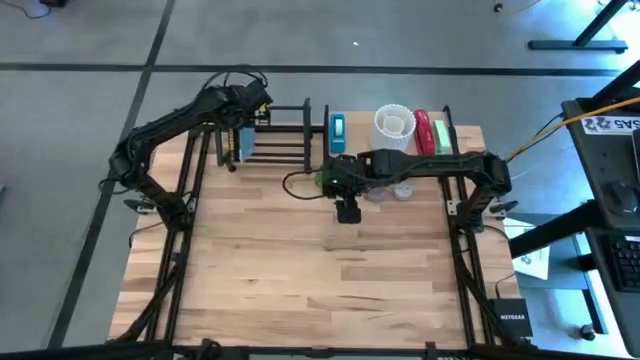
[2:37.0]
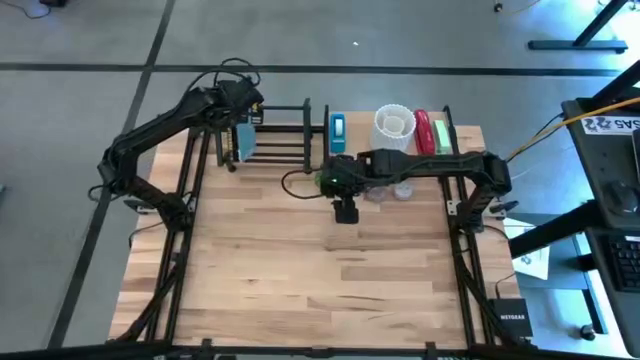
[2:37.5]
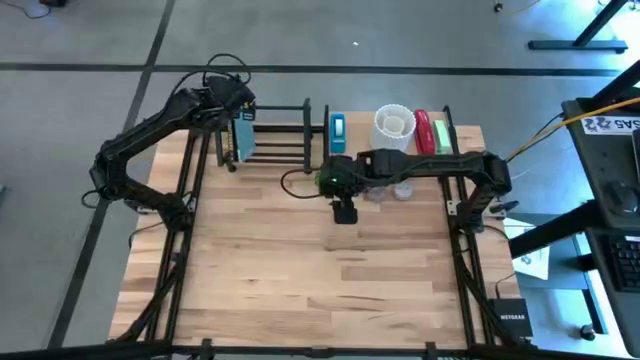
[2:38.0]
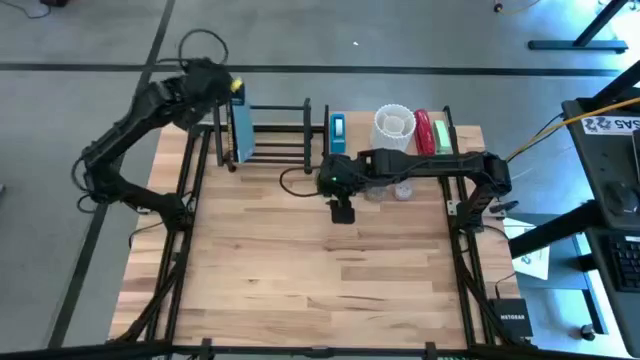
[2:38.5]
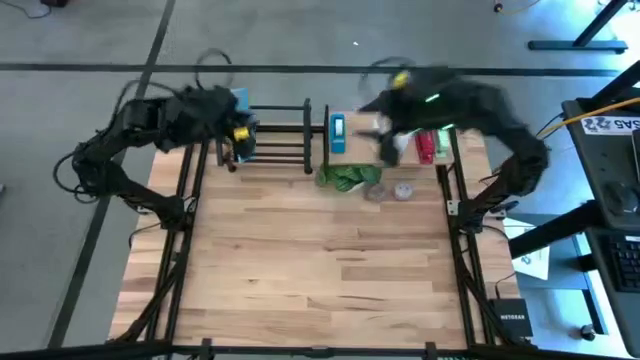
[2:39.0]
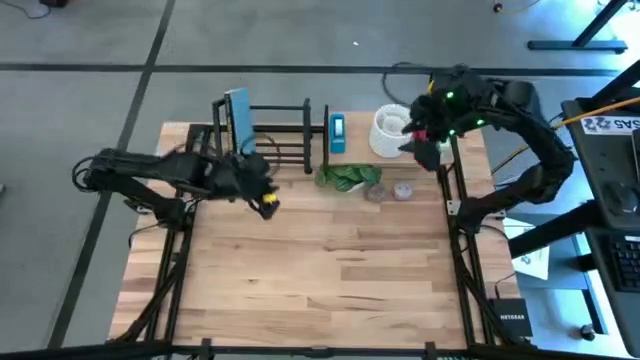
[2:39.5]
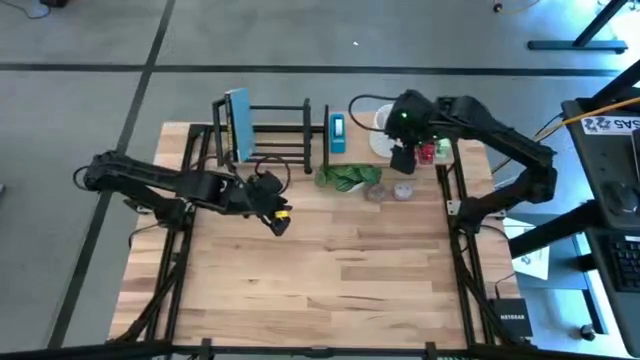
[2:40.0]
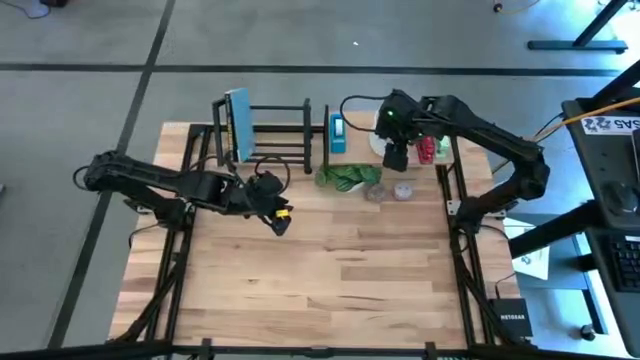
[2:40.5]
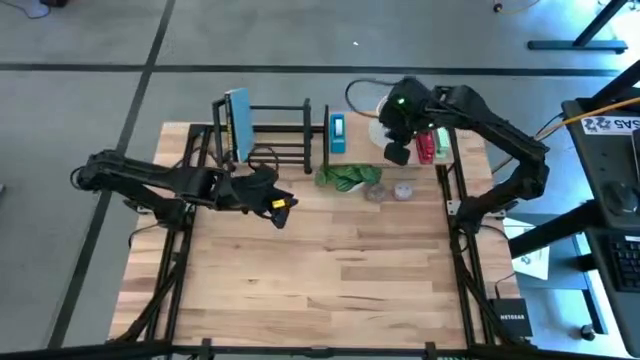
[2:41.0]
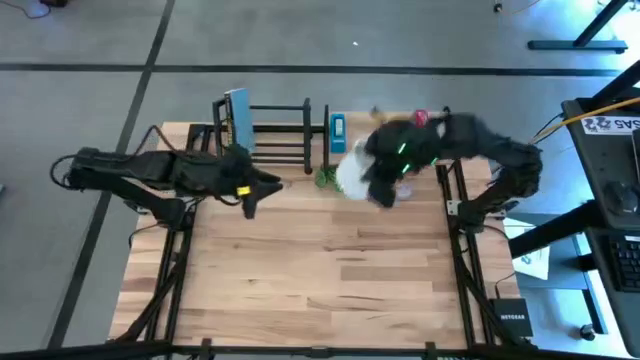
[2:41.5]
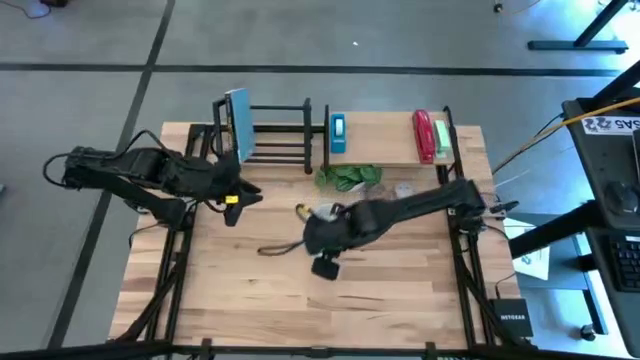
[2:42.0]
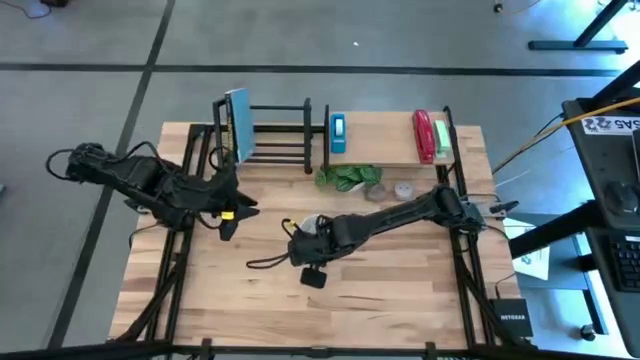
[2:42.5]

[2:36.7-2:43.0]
Task: Stock shelves
Remove the white pencil holder from the shelf

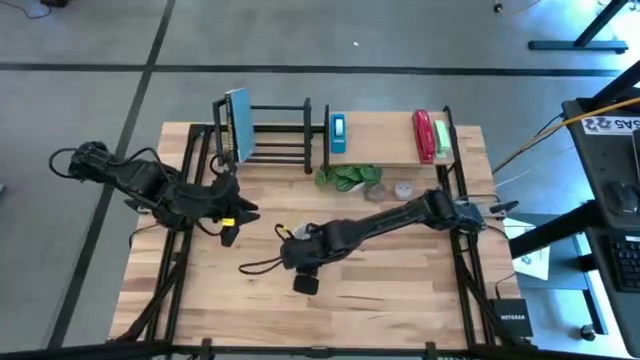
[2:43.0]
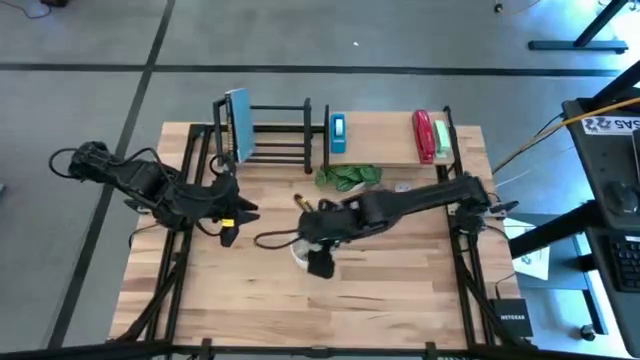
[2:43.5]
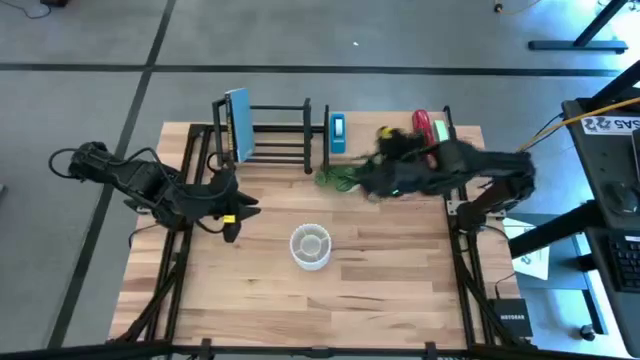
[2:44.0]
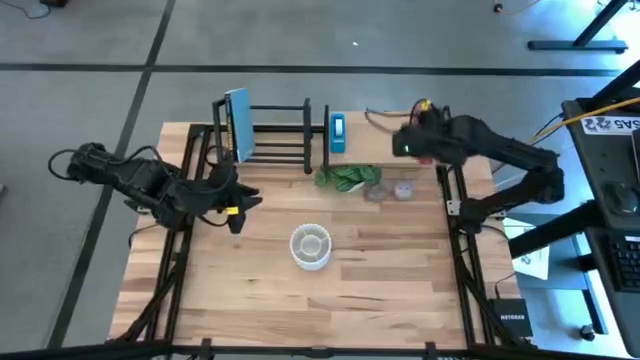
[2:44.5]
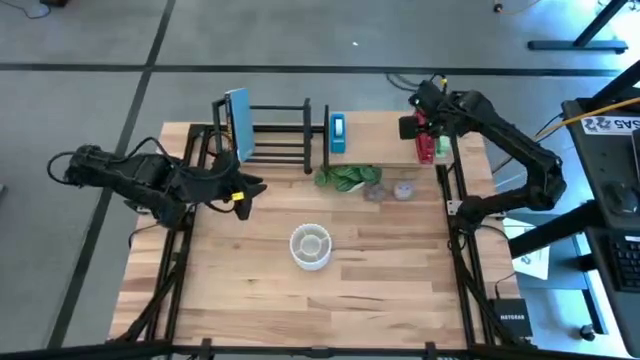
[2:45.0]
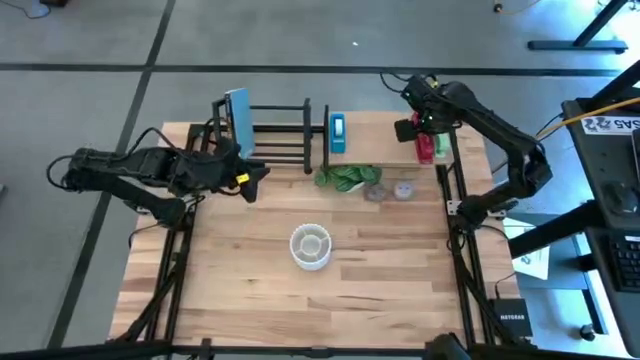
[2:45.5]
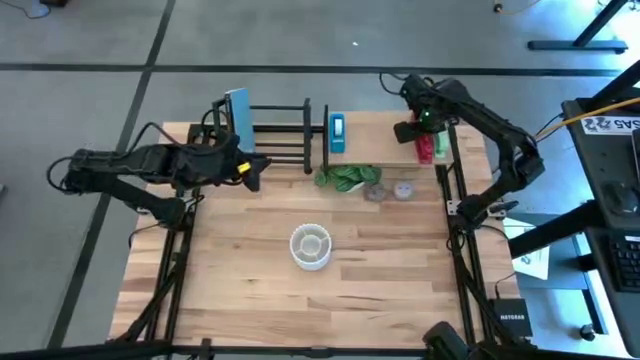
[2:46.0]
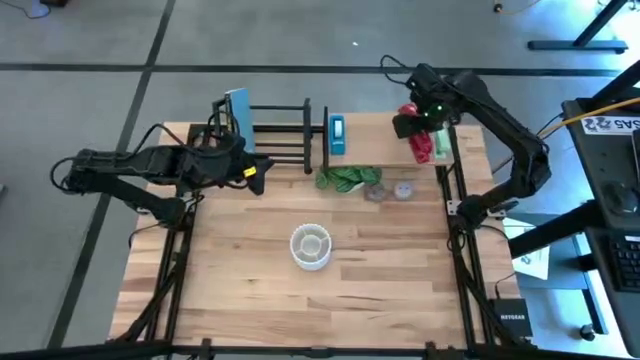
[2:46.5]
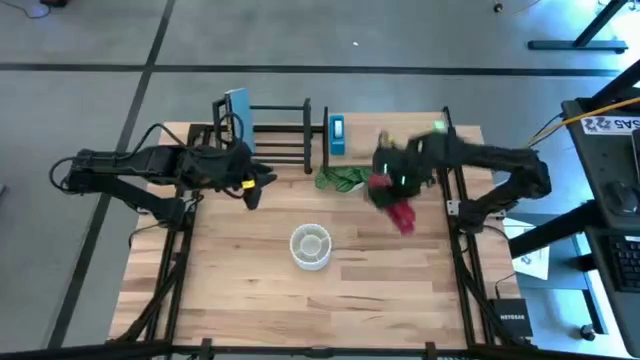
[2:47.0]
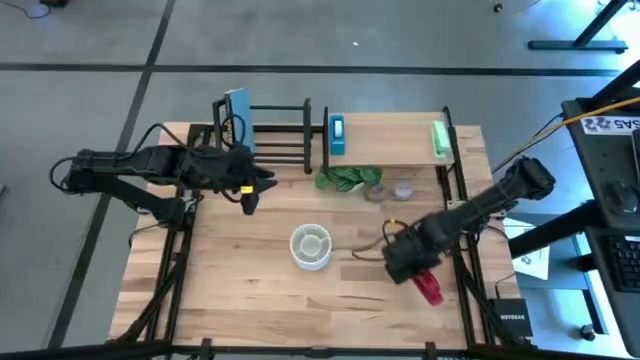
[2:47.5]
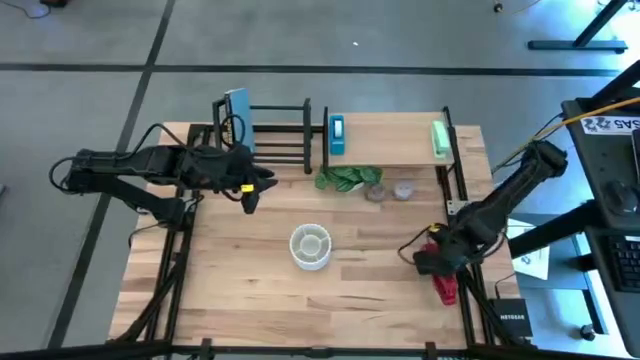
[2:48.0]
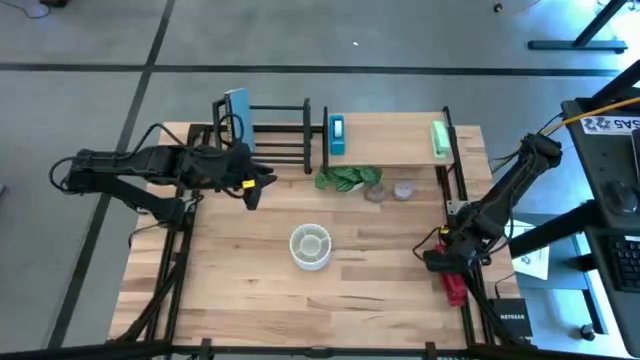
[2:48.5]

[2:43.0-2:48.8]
Remove the red stapler from the shelf

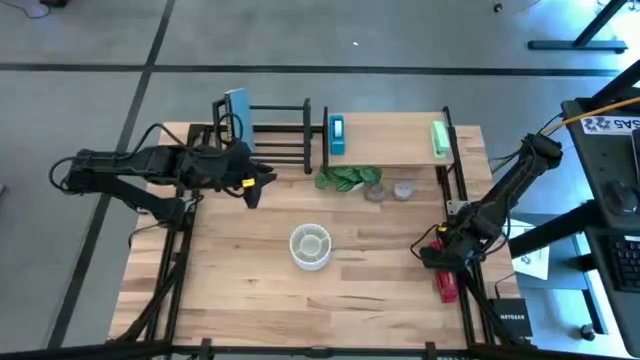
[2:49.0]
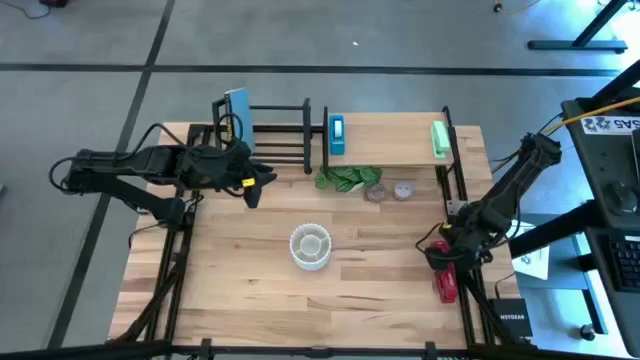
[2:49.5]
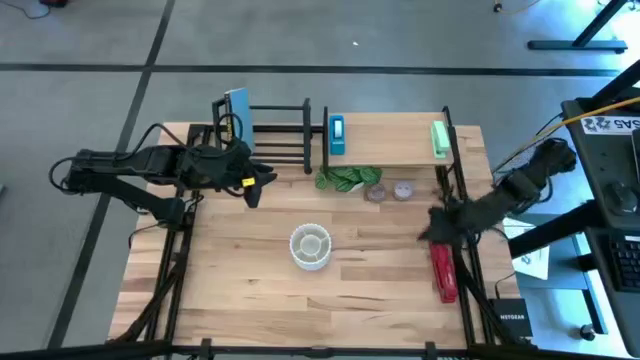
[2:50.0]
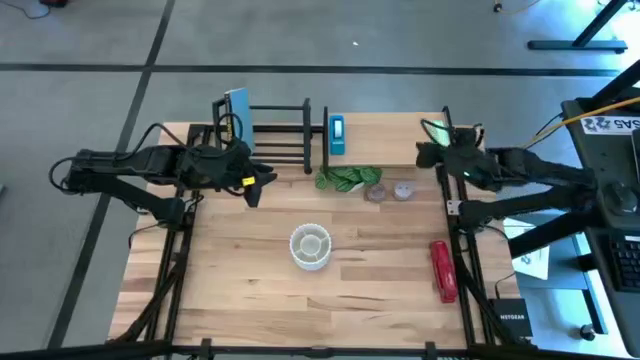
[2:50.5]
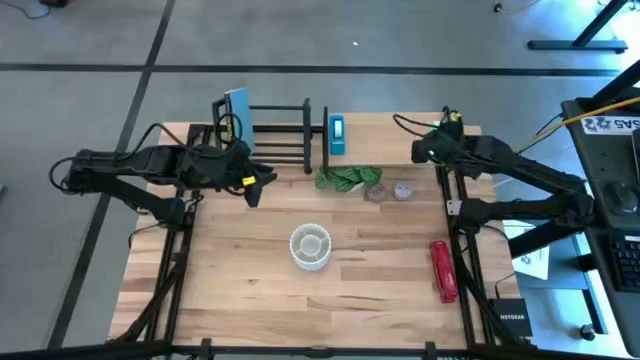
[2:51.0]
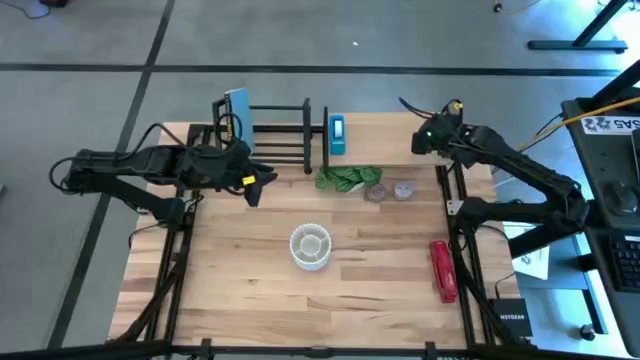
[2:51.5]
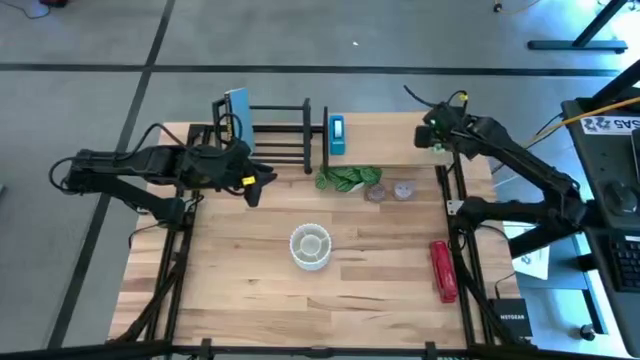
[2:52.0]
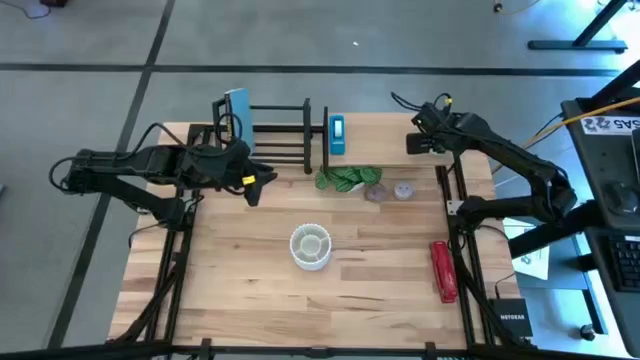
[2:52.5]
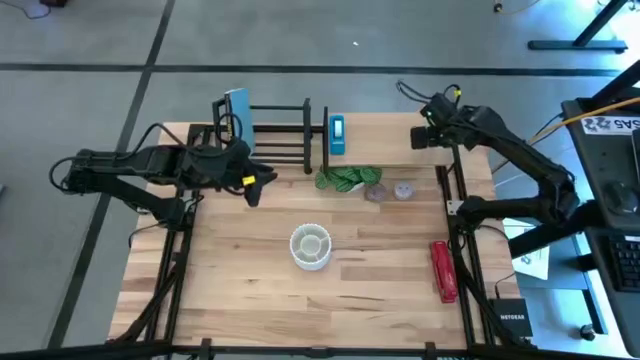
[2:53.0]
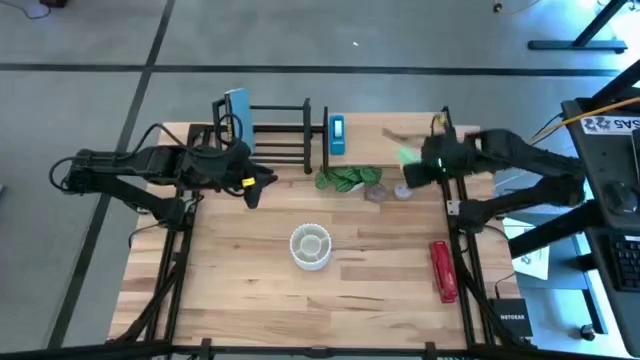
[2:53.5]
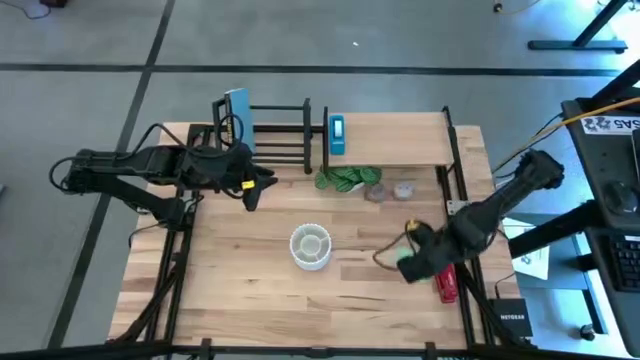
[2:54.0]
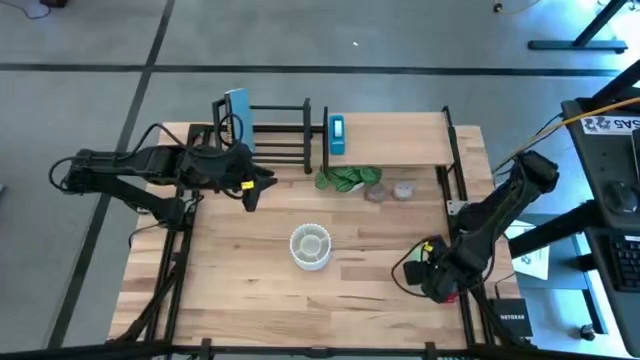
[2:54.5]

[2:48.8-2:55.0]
Remove the green stapler from the shelf

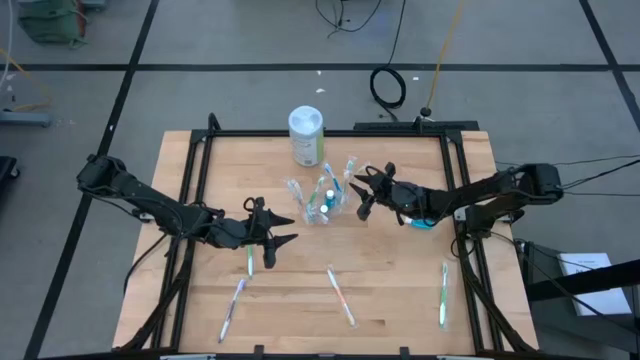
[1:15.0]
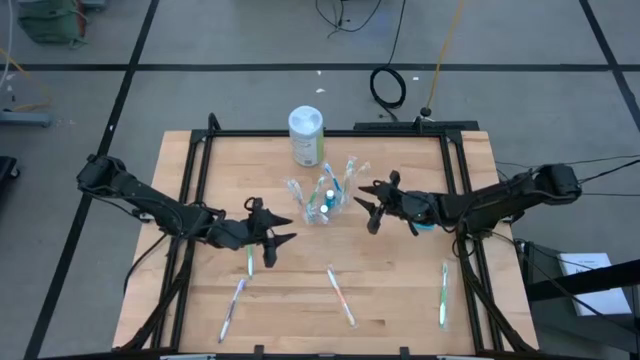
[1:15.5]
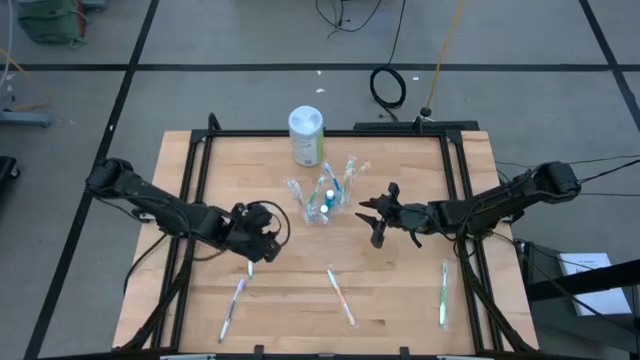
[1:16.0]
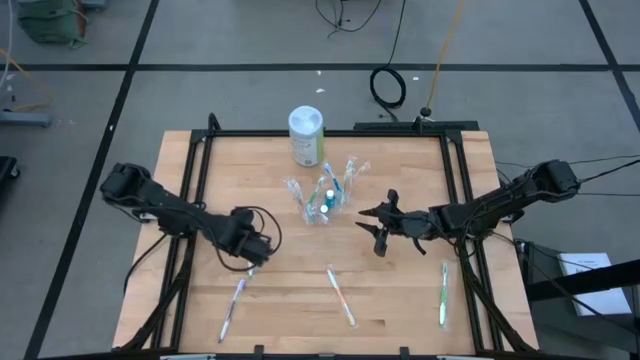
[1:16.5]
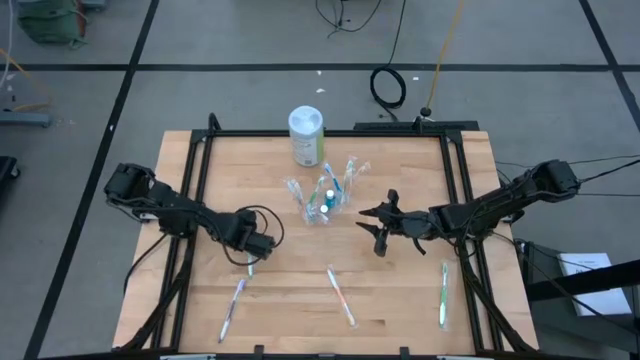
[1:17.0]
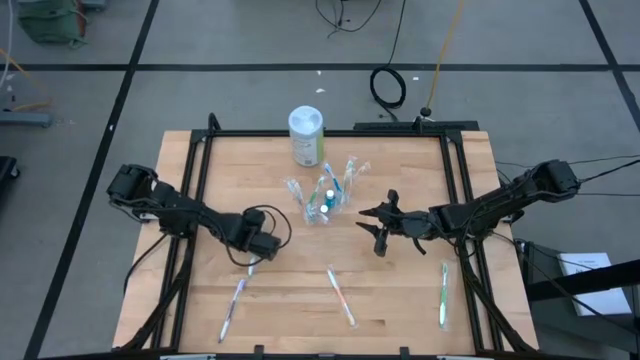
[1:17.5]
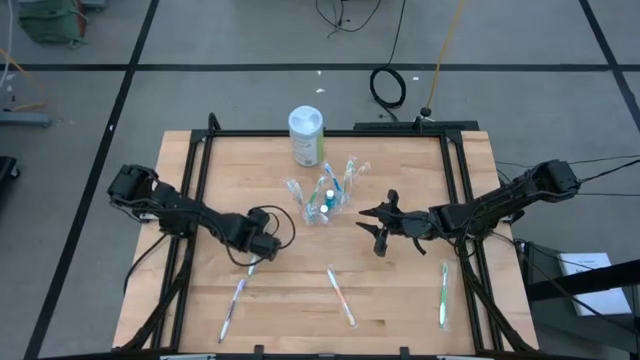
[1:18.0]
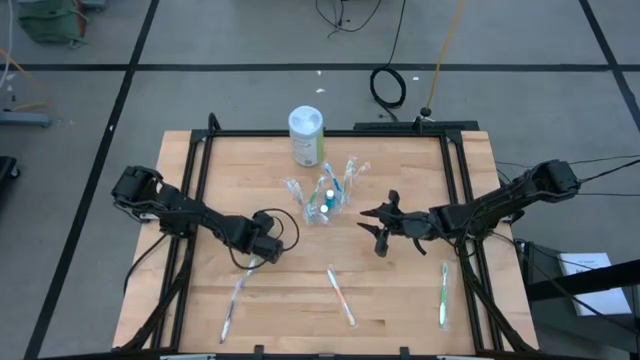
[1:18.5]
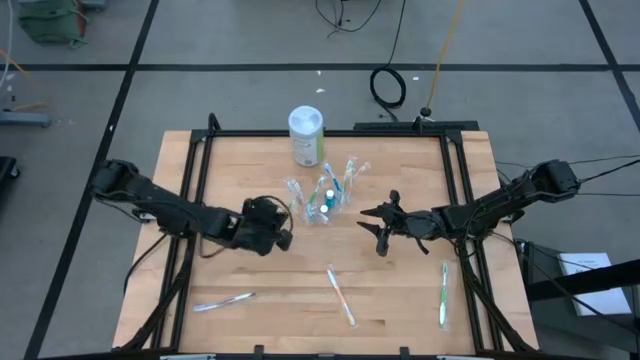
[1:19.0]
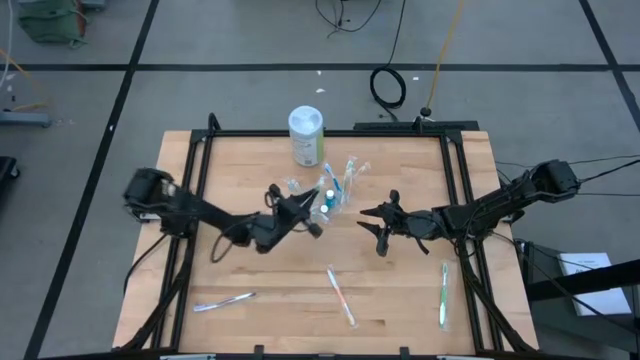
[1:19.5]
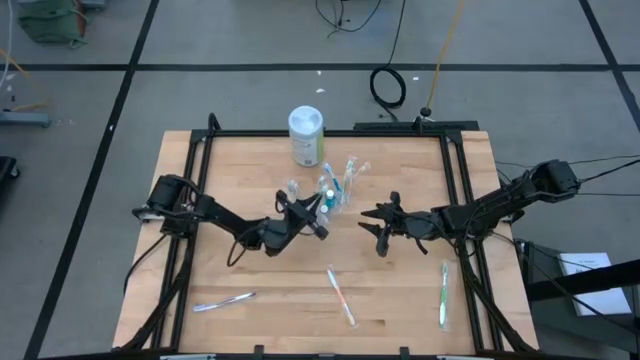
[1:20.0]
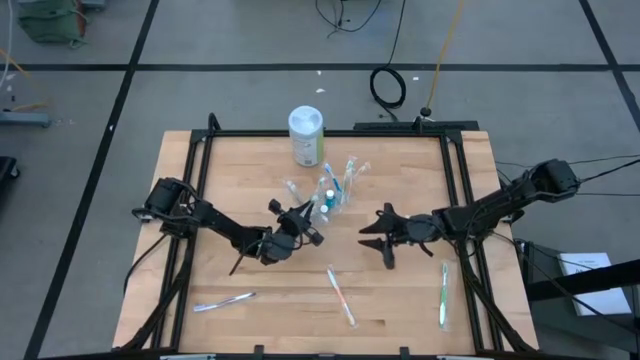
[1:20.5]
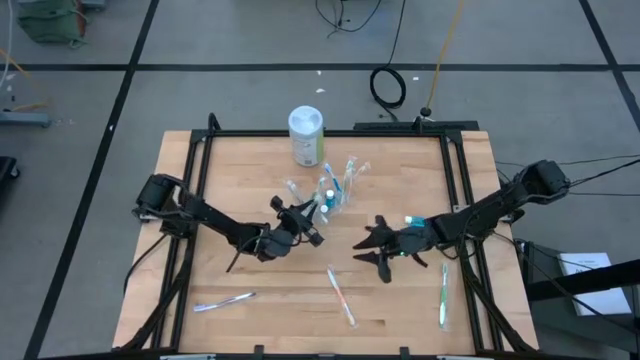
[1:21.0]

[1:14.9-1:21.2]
Task: Pick & Place toothbrushing station
Put the green toothbrush into the transparent organizer
